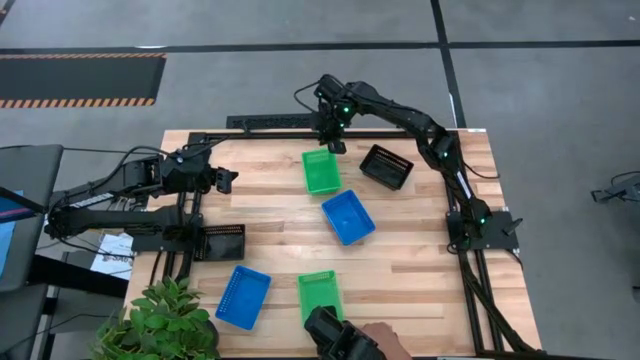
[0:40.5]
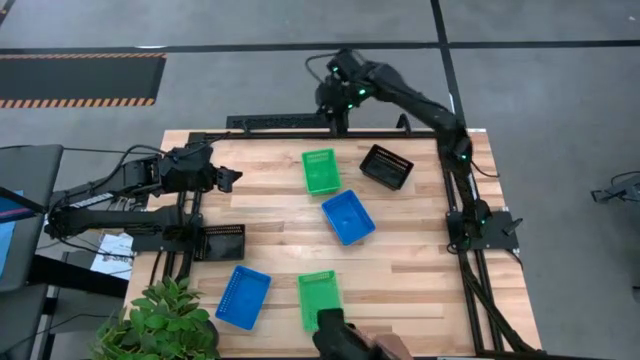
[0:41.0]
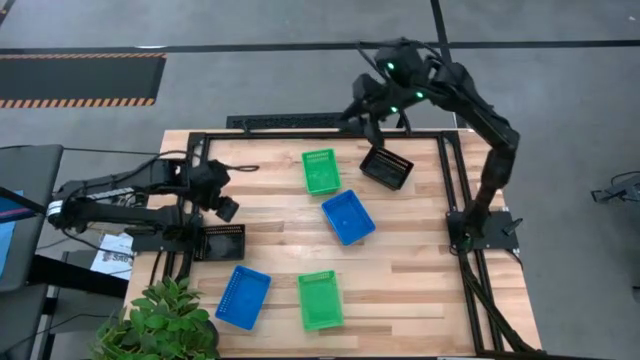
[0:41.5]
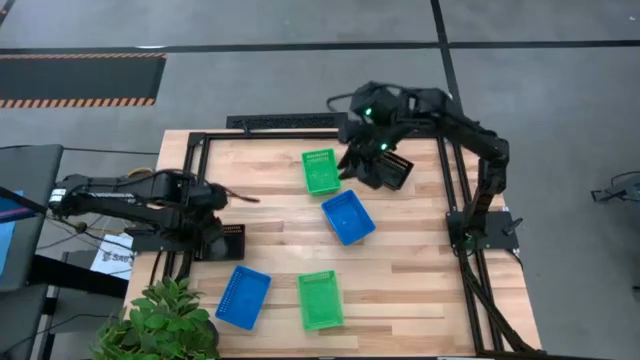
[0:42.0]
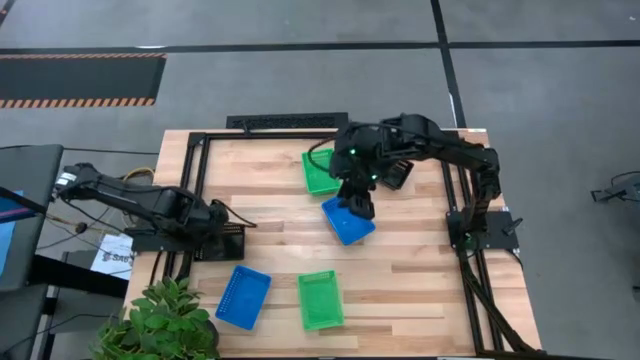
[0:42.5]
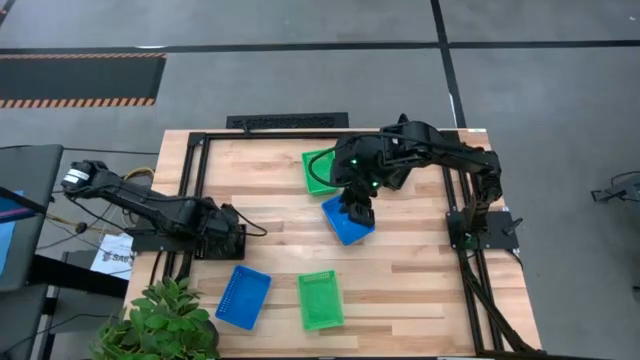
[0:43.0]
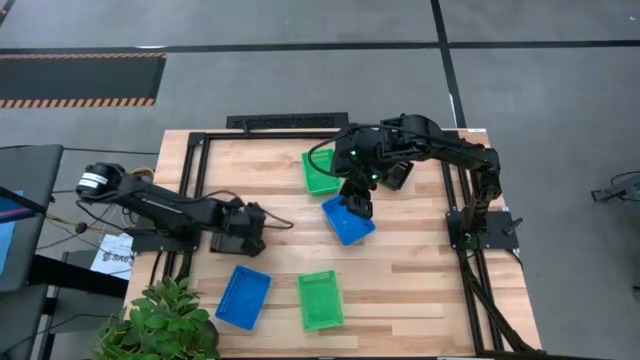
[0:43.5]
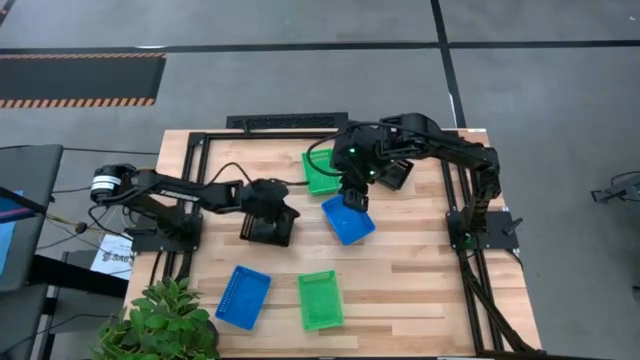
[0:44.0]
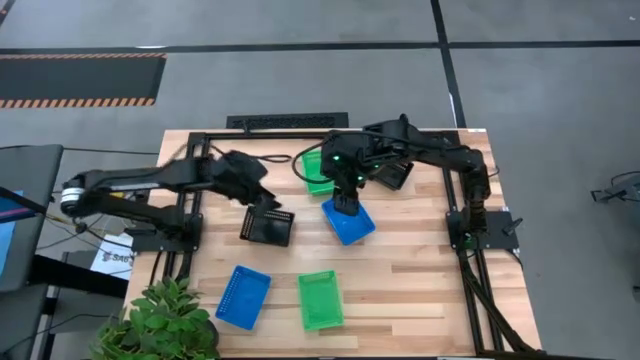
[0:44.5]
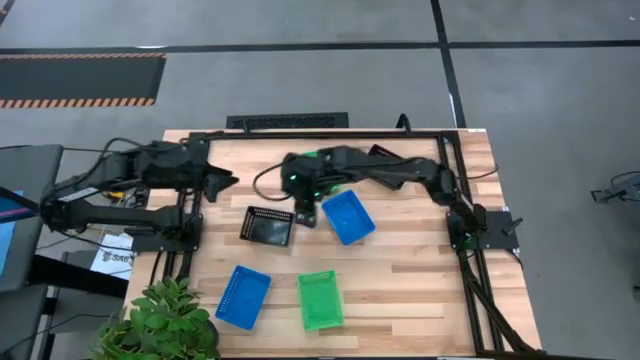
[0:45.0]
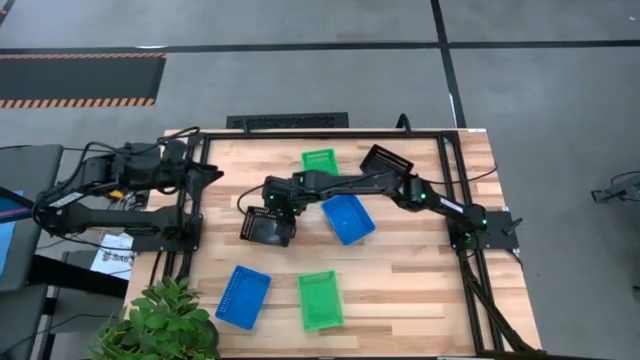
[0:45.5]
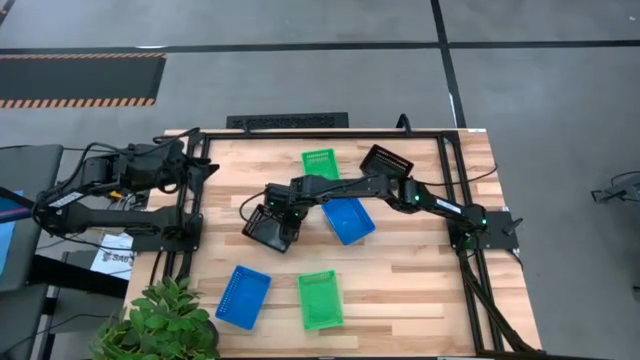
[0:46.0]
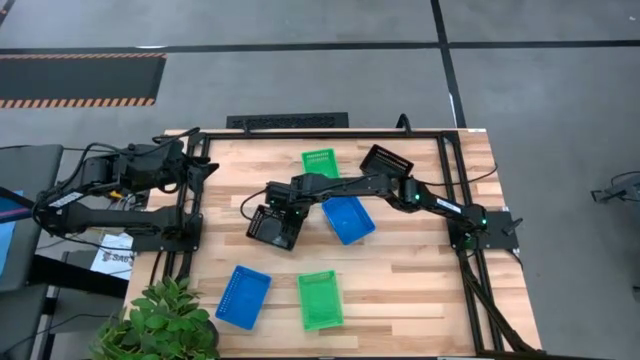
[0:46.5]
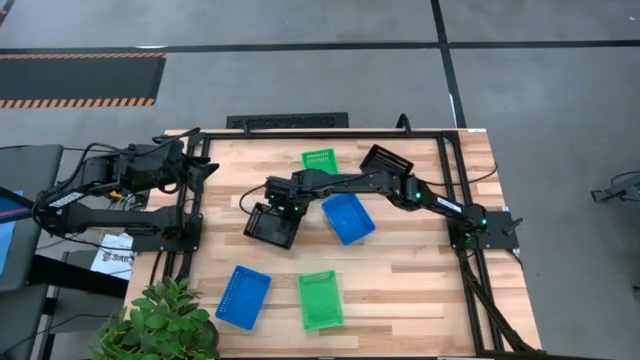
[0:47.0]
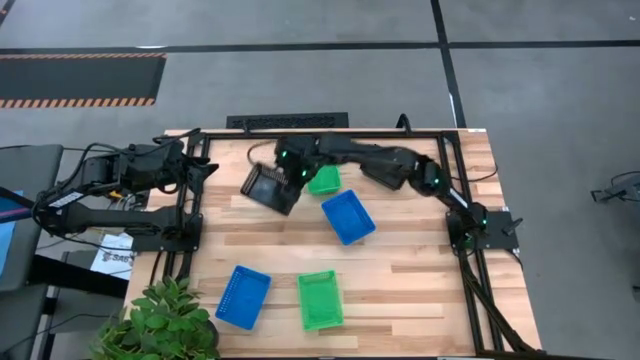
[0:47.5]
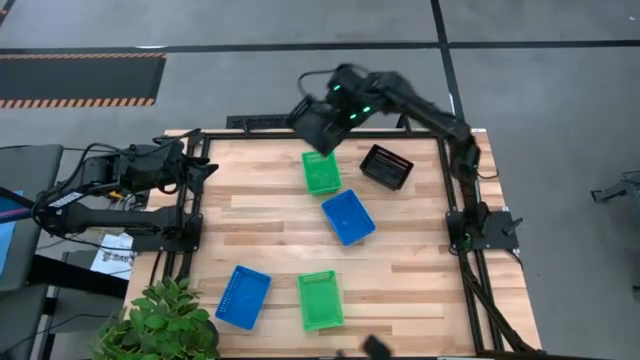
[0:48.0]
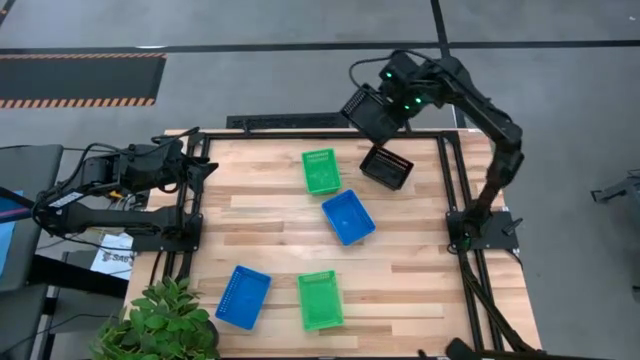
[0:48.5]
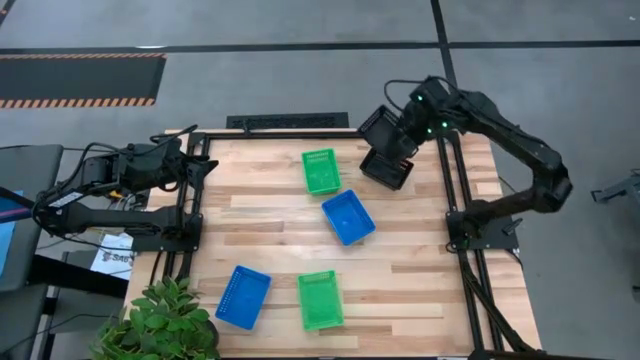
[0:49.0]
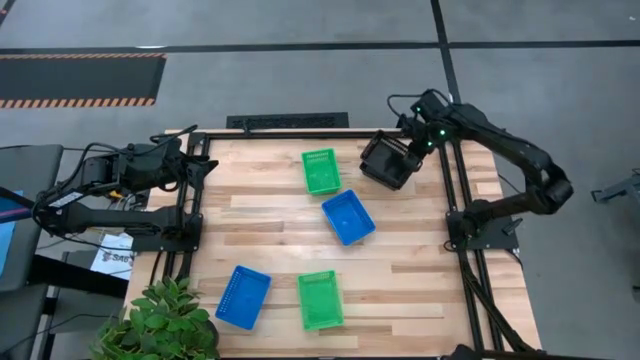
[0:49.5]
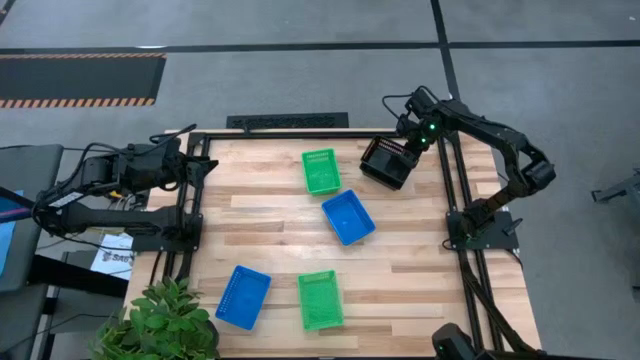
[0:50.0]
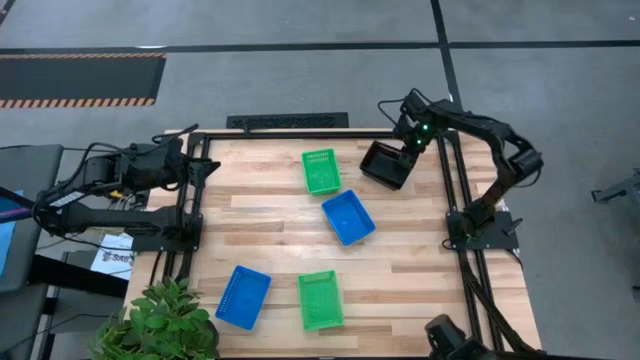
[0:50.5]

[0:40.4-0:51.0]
Stack the left black bin on the right stacked black bins

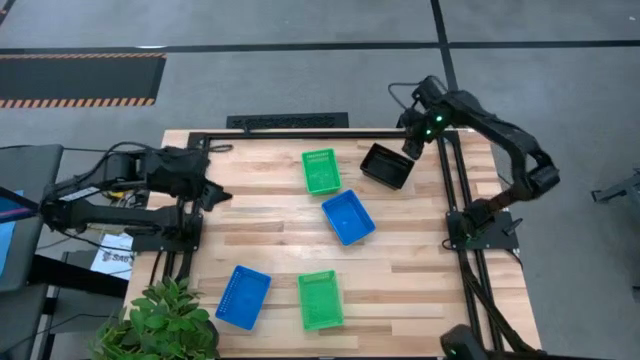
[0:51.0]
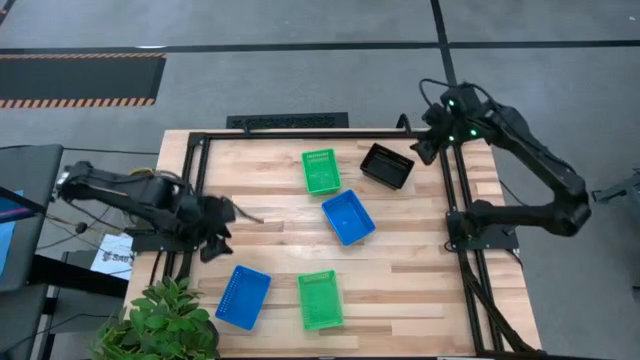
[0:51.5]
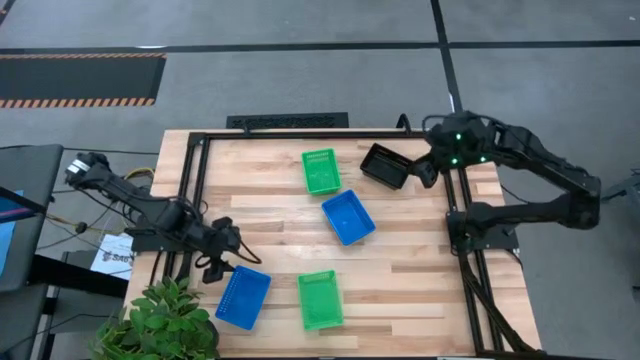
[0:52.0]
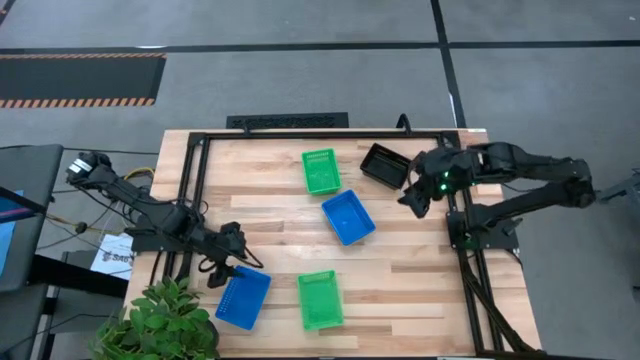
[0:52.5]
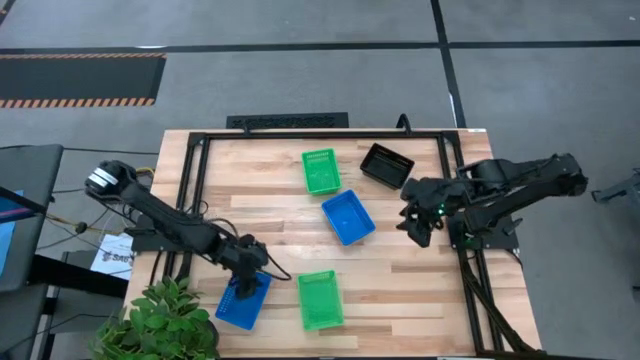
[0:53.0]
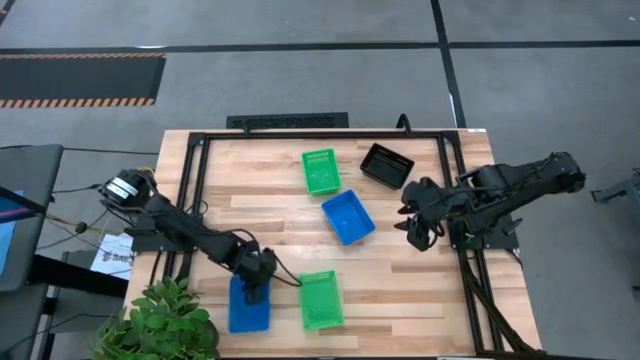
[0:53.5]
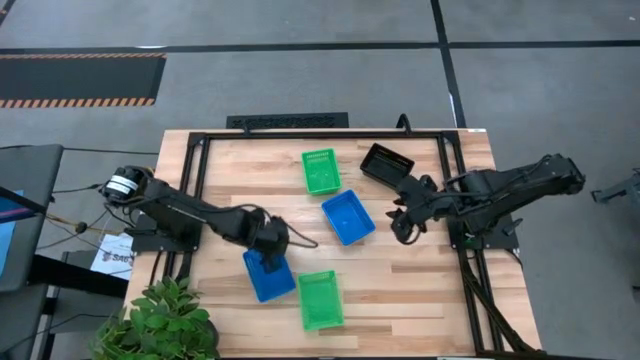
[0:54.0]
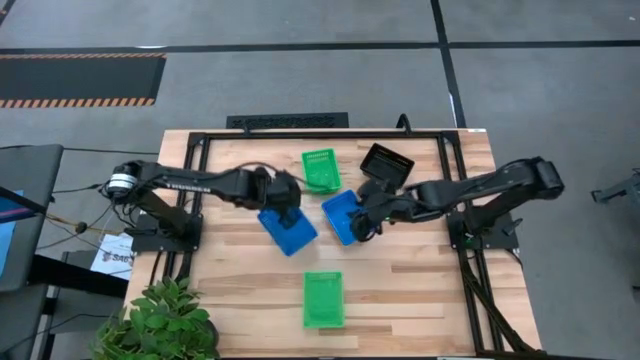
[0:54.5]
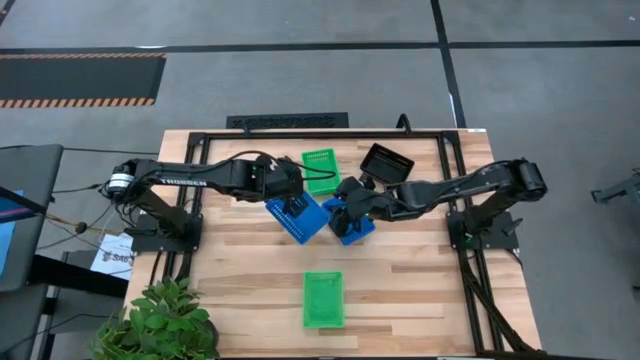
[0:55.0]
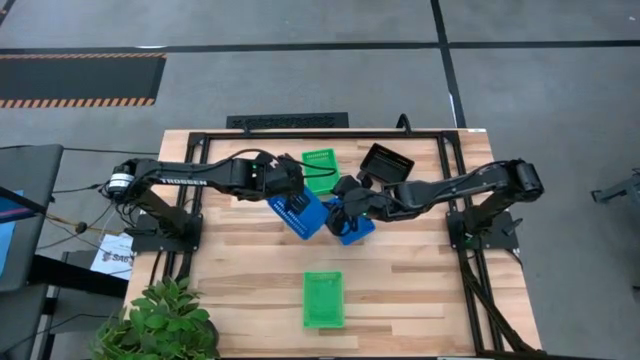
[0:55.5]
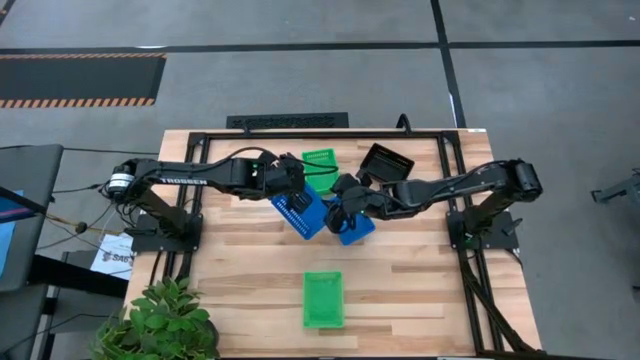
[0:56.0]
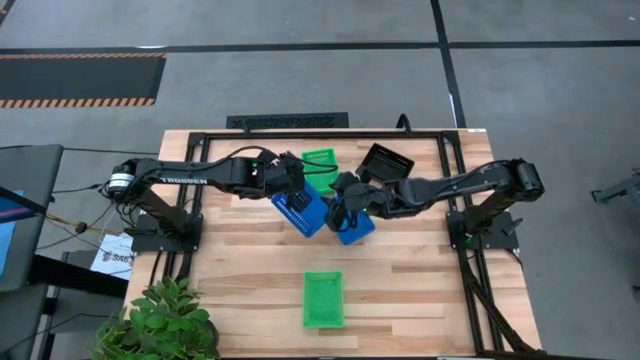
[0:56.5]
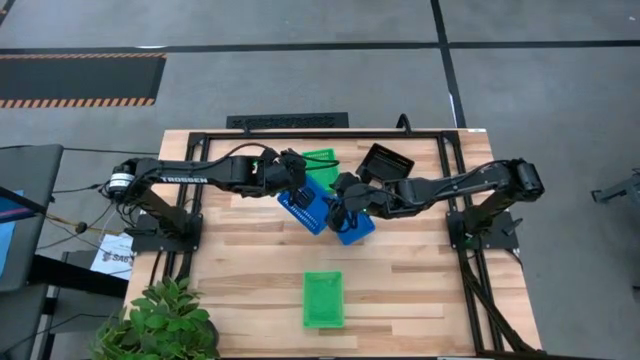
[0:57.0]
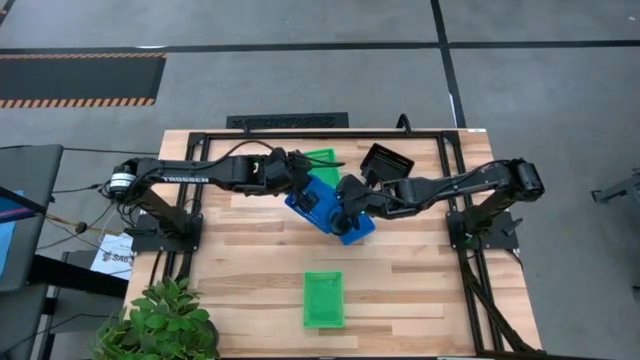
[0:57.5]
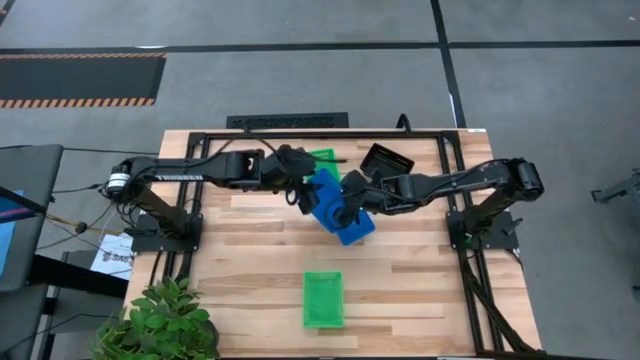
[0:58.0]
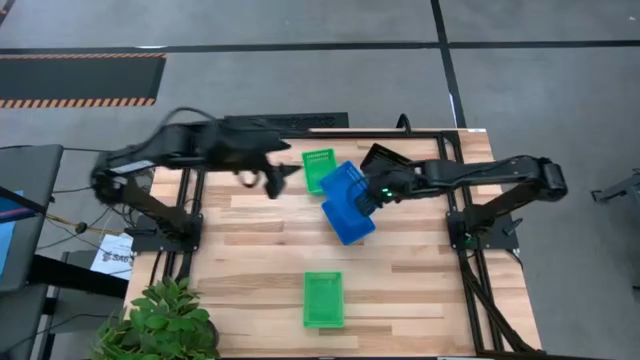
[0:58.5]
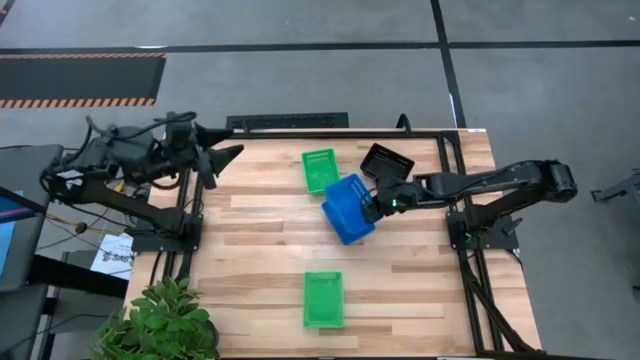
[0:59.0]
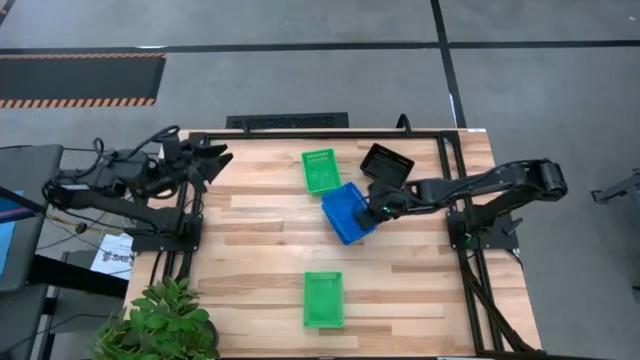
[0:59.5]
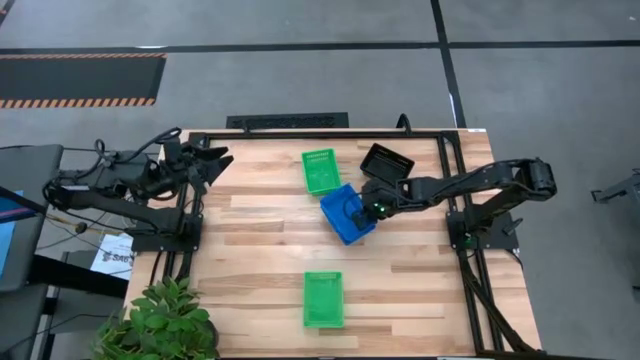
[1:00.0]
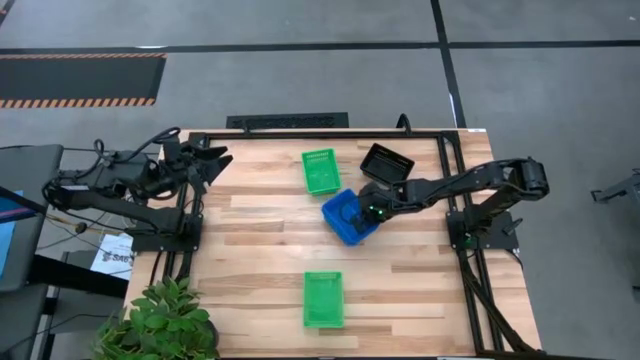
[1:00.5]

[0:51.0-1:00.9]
Stack the bottom blue bin on the top stacked blue bins
